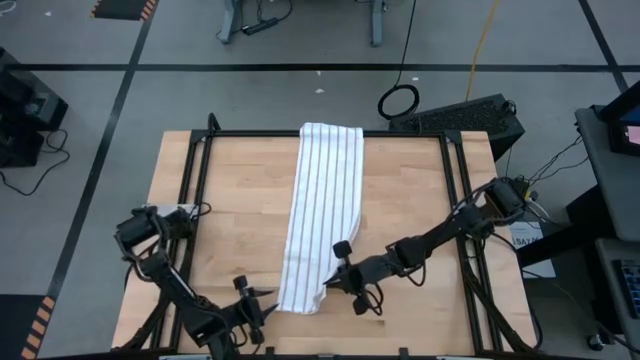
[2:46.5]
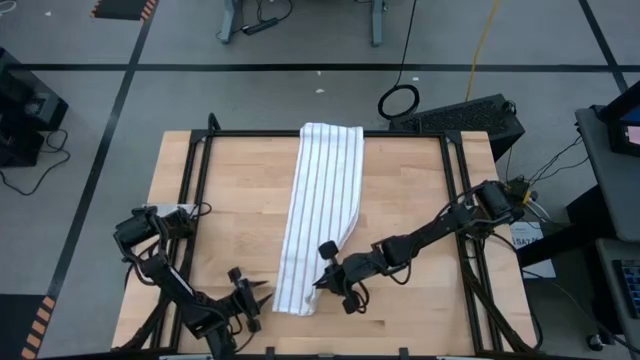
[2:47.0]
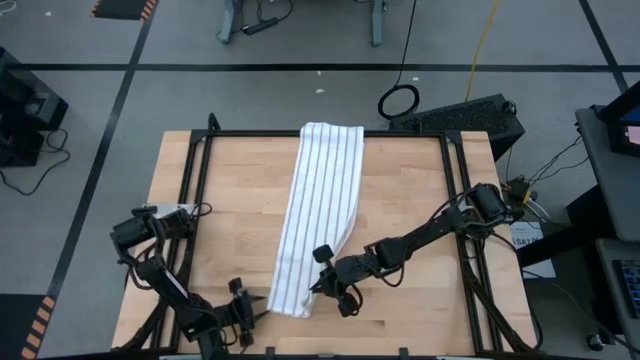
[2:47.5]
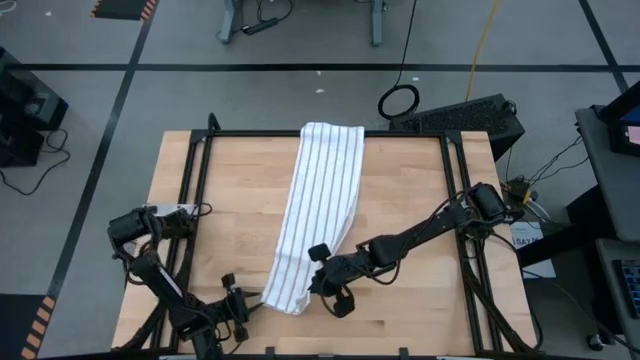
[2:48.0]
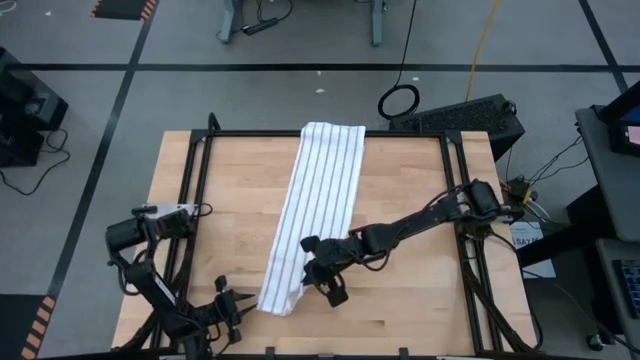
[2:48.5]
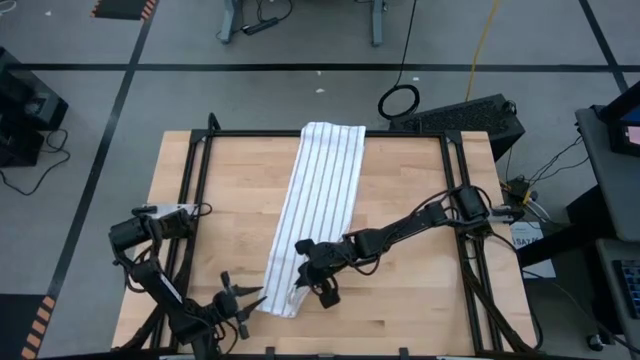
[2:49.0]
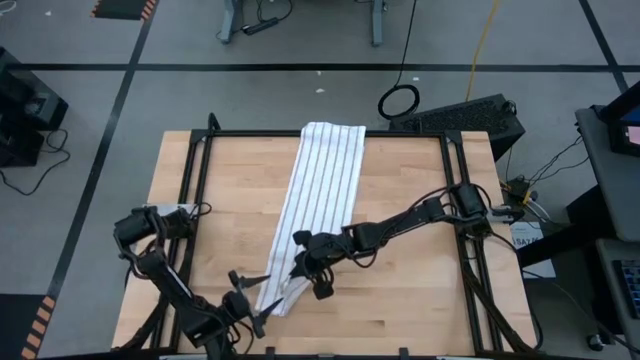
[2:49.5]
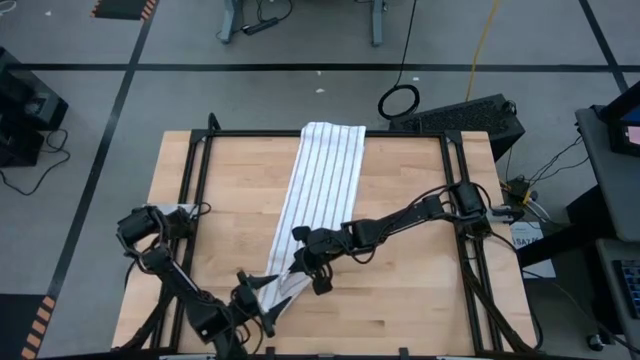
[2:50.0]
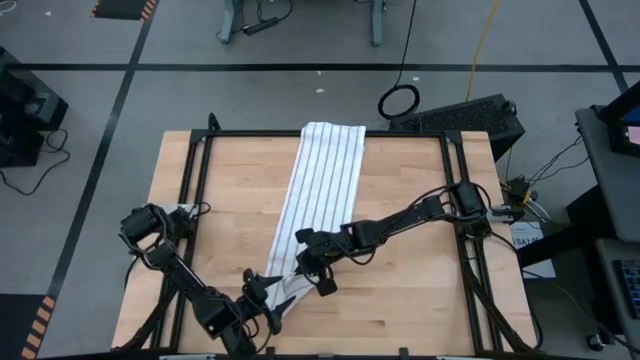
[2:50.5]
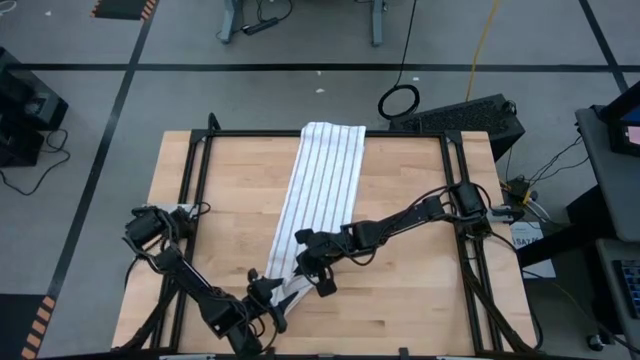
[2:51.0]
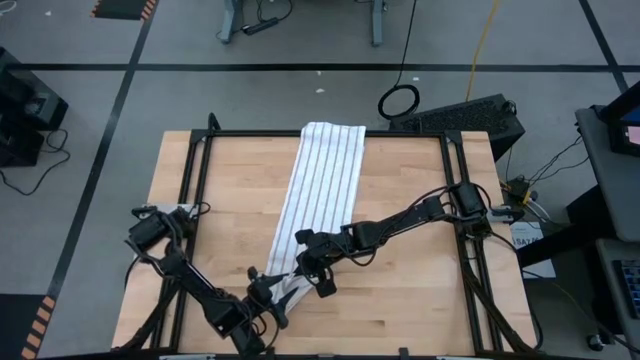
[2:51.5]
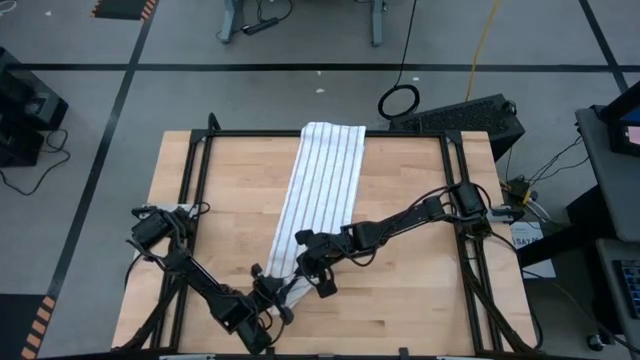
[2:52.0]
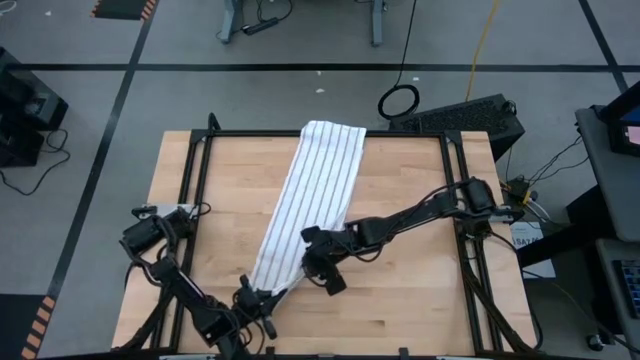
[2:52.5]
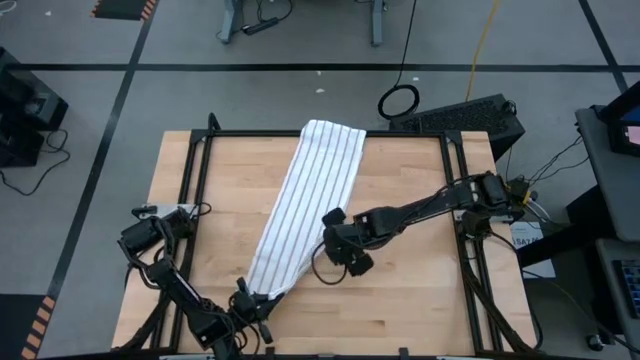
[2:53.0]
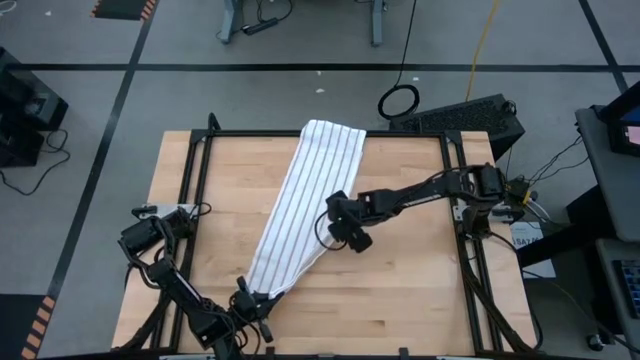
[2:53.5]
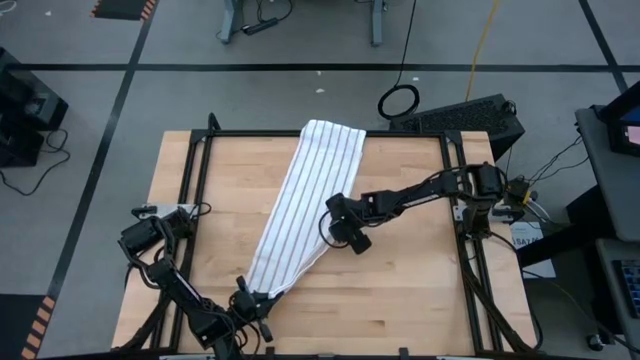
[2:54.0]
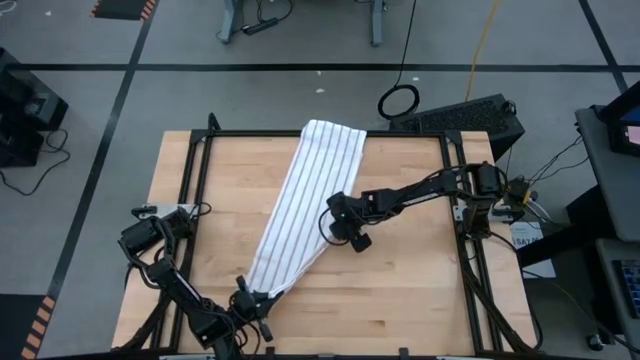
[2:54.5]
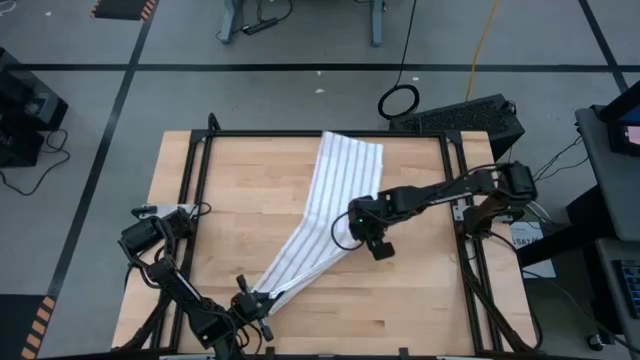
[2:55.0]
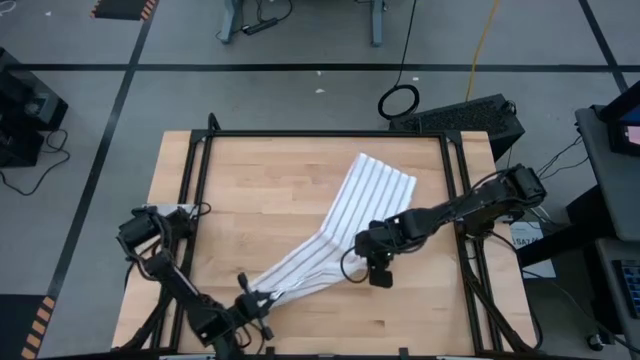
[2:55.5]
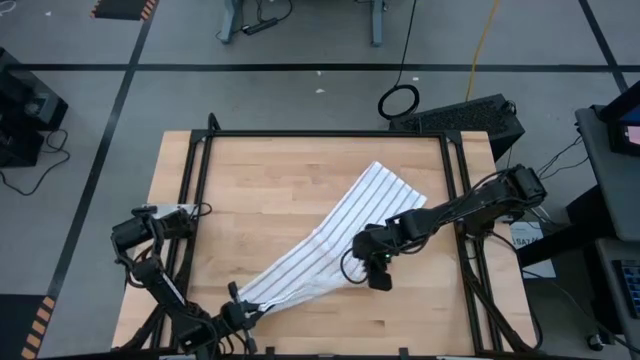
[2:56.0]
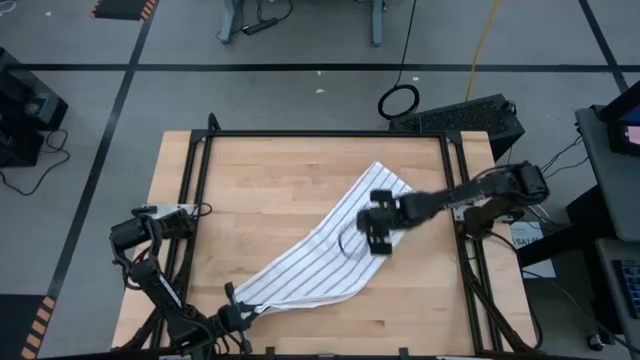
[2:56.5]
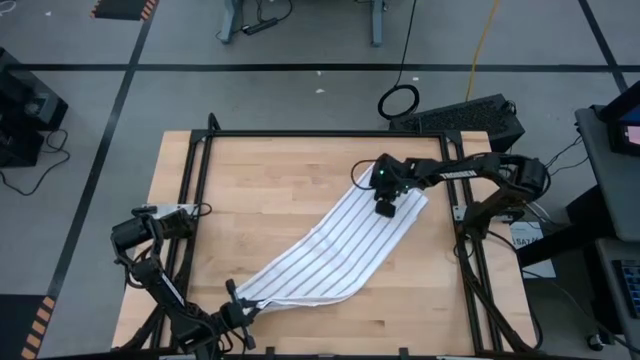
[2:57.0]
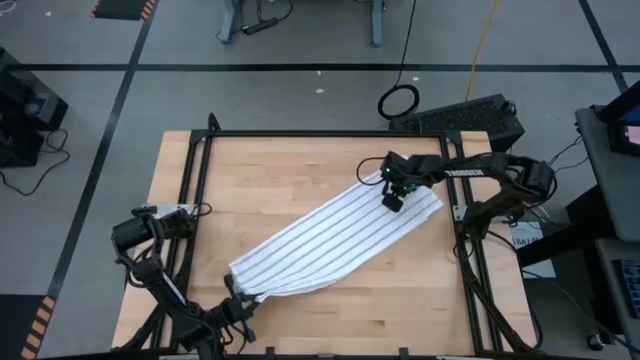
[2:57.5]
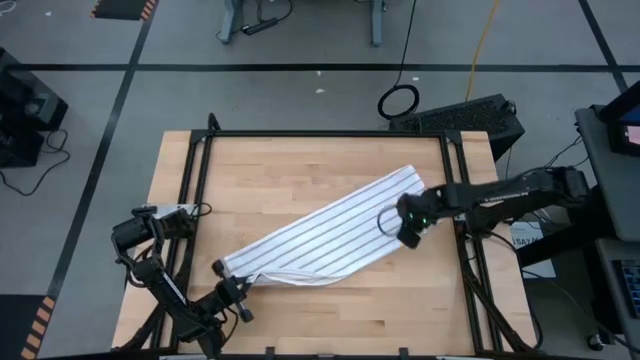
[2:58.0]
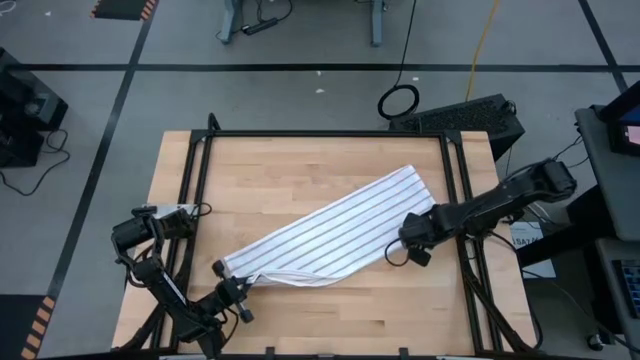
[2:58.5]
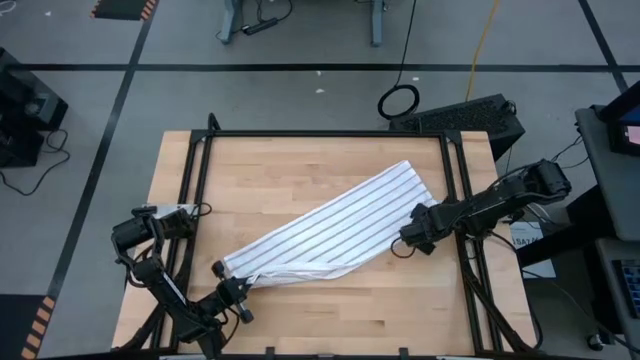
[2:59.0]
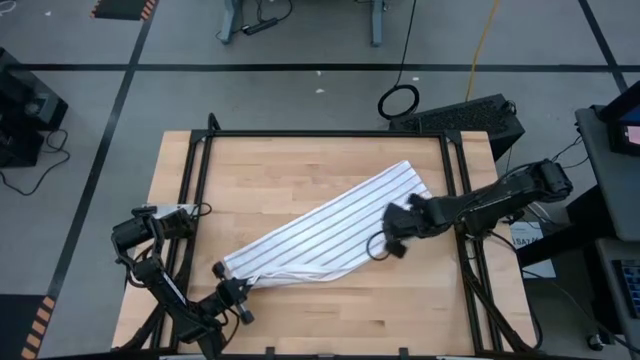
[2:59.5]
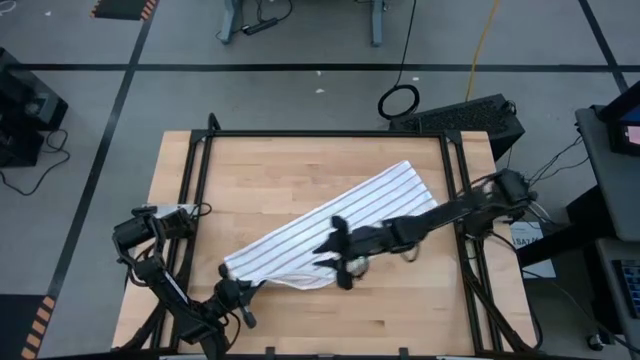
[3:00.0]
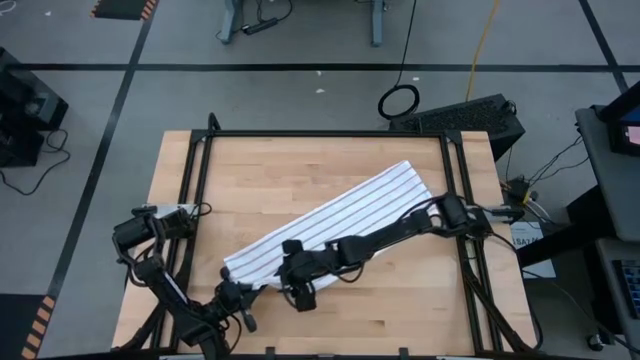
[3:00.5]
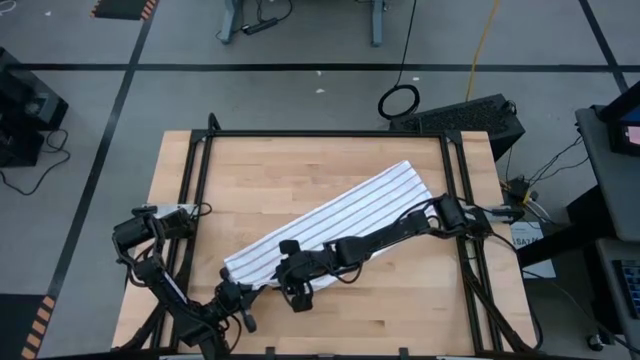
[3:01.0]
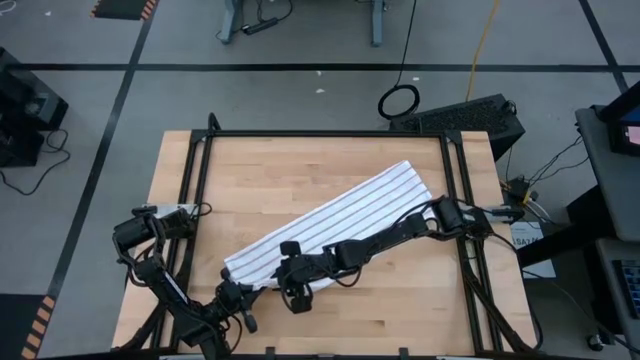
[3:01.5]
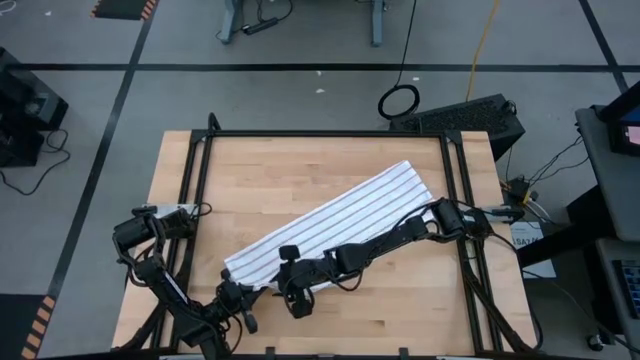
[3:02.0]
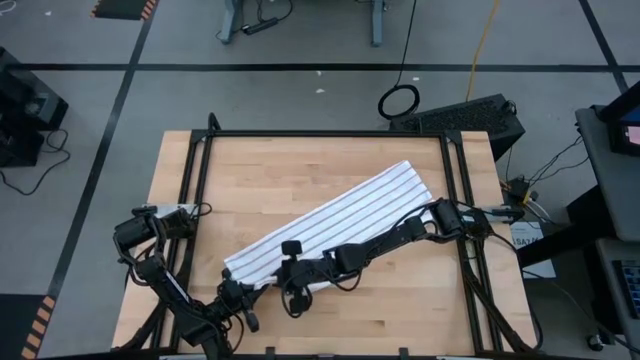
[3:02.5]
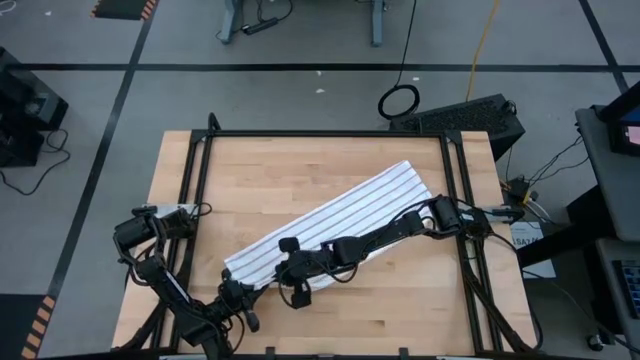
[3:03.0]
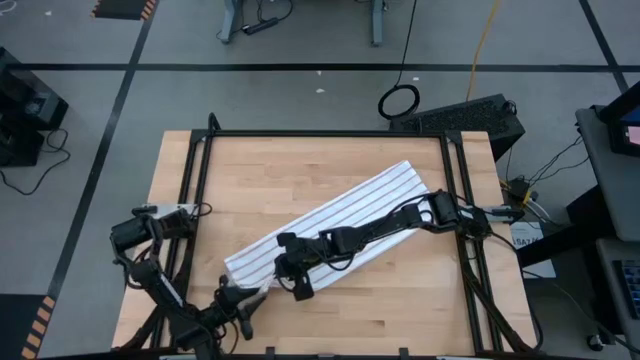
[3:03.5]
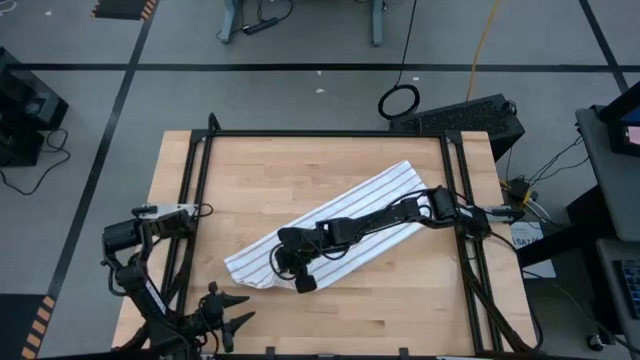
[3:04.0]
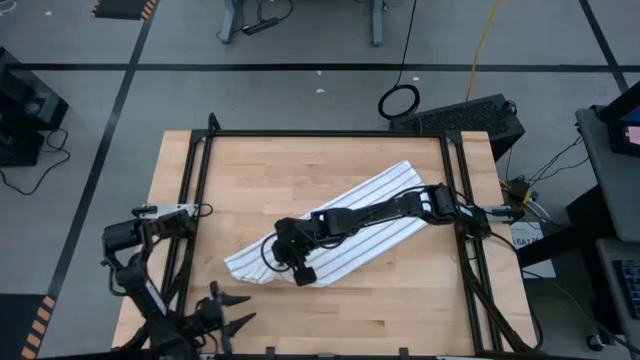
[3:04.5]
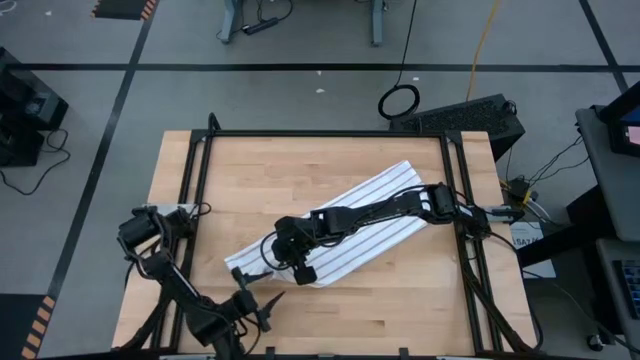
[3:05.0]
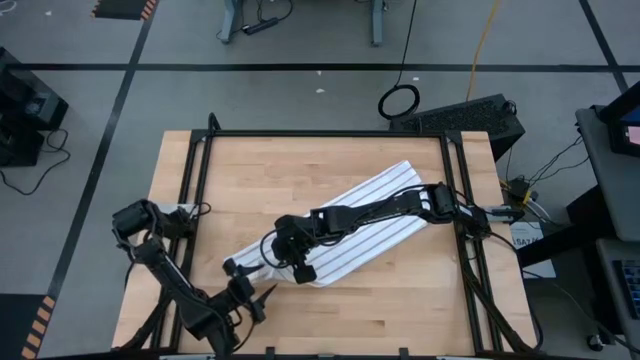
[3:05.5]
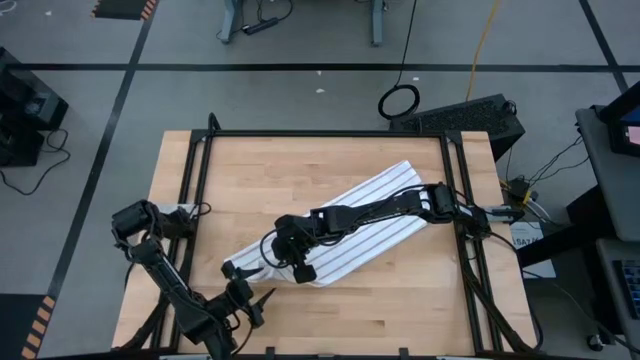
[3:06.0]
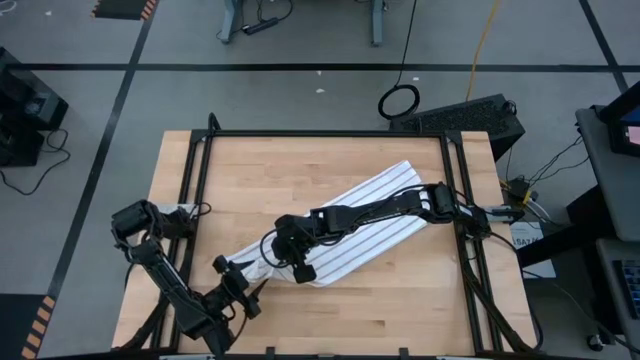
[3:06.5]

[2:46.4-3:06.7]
Task: Roll towel into tight, uniform cylinder
Fold the white brown kitchen towel

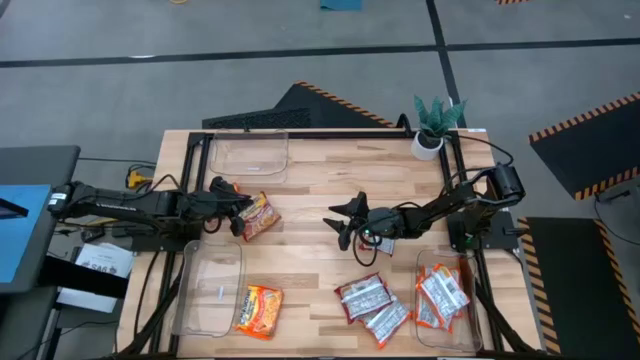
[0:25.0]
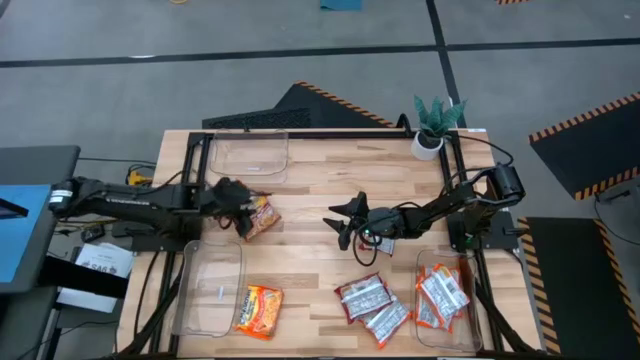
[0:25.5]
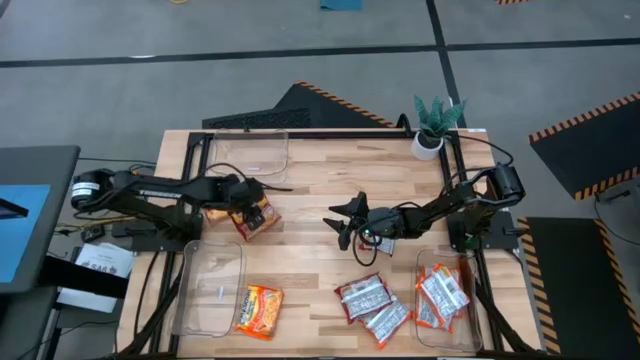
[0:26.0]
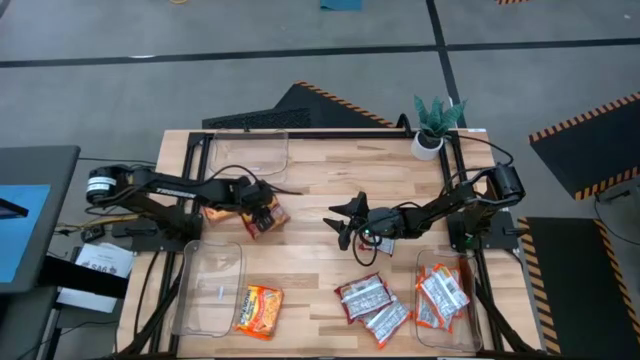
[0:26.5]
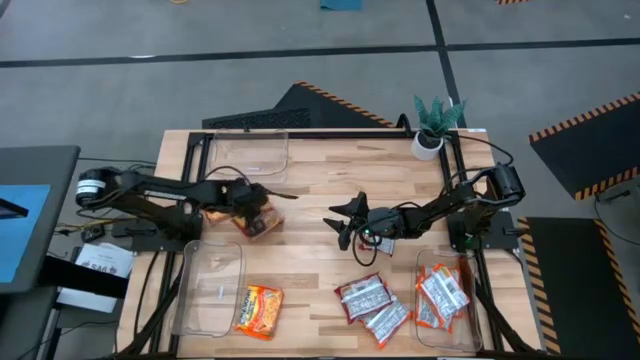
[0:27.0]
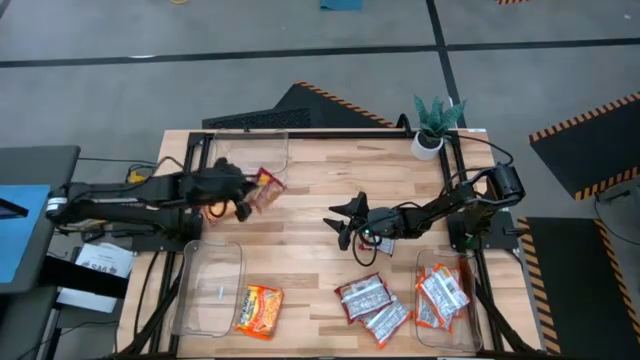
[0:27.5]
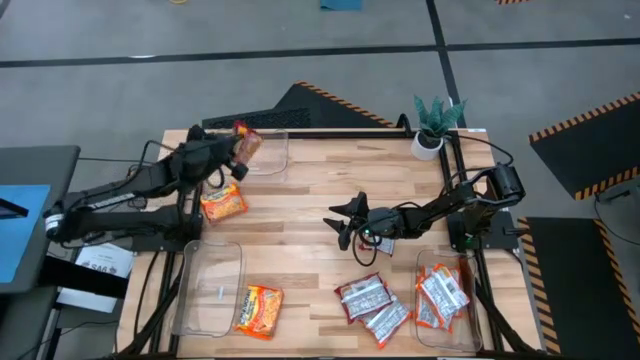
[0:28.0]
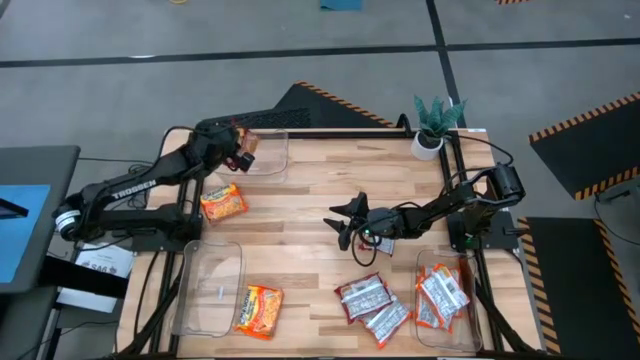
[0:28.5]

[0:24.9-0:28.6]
Task: Sort Maruchan noodles
Put the red noodle pack into the top left transparent bin
